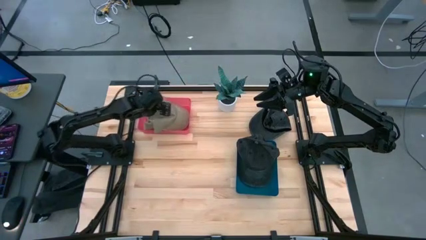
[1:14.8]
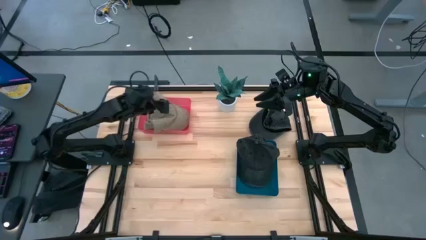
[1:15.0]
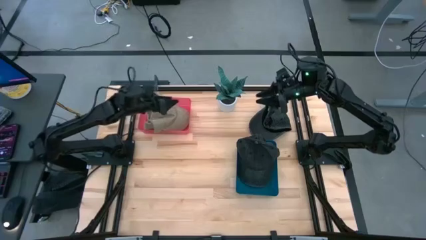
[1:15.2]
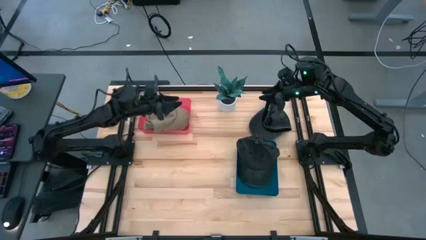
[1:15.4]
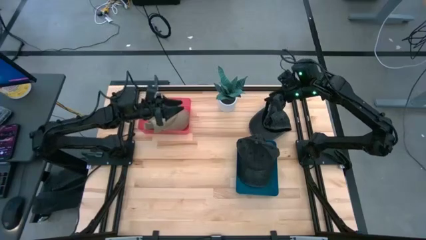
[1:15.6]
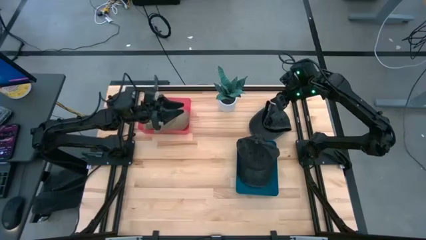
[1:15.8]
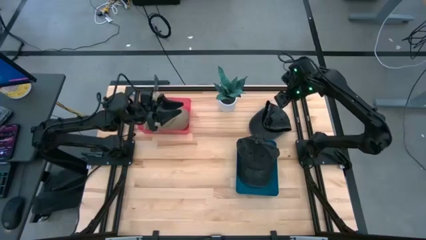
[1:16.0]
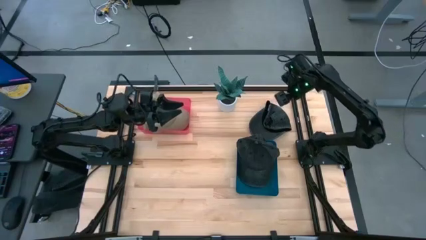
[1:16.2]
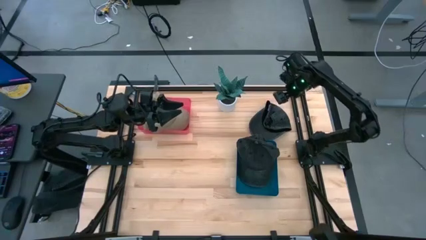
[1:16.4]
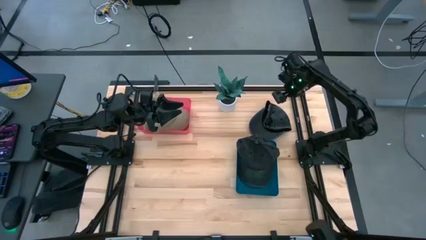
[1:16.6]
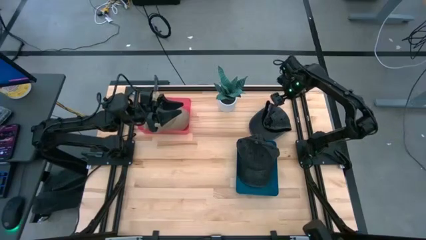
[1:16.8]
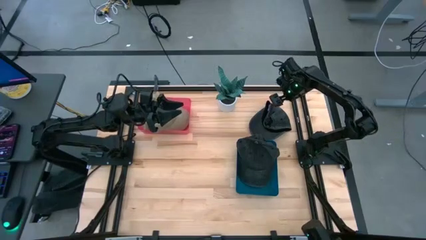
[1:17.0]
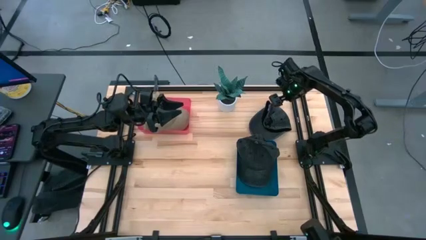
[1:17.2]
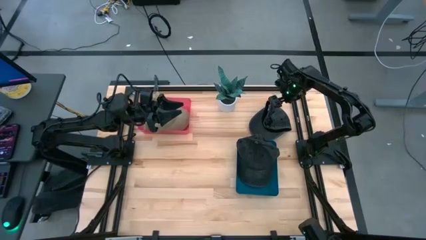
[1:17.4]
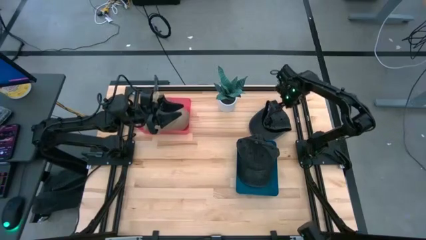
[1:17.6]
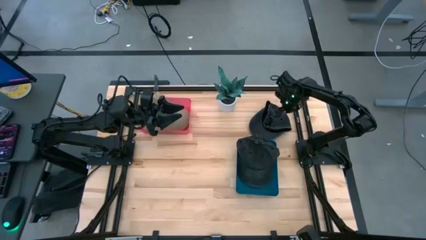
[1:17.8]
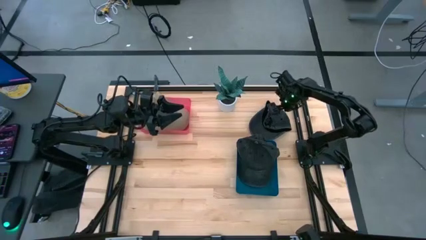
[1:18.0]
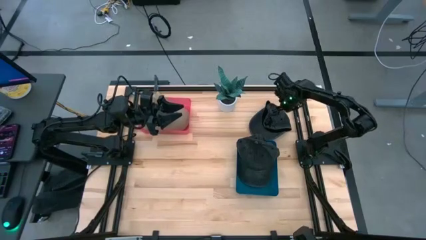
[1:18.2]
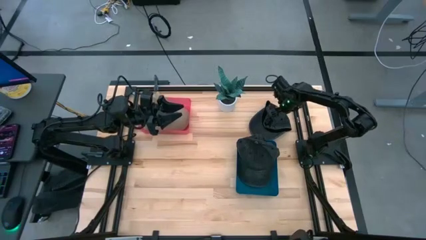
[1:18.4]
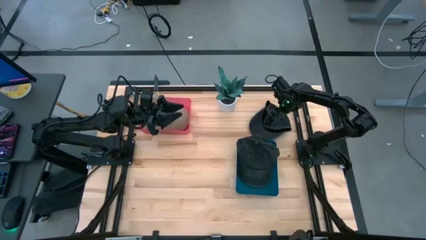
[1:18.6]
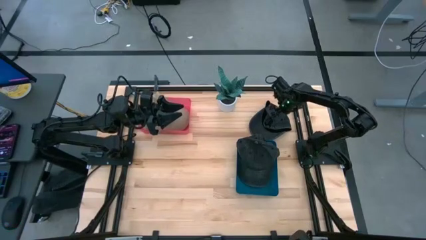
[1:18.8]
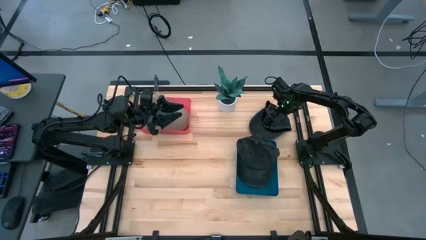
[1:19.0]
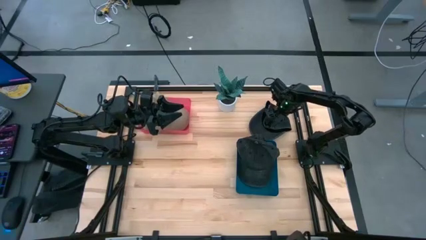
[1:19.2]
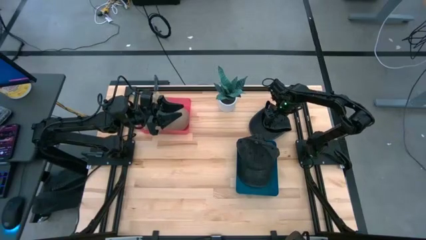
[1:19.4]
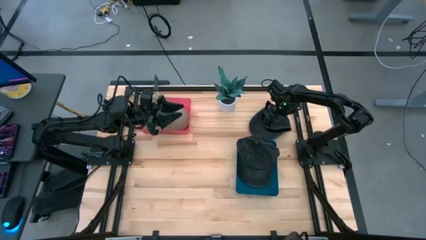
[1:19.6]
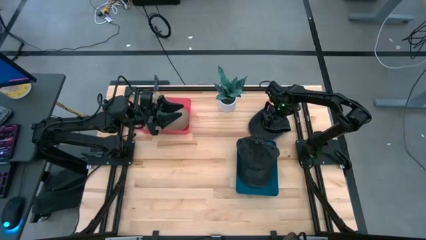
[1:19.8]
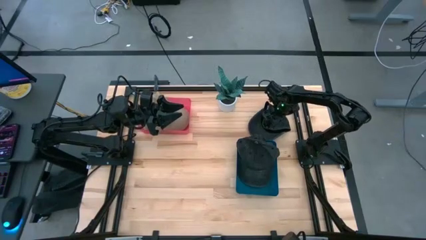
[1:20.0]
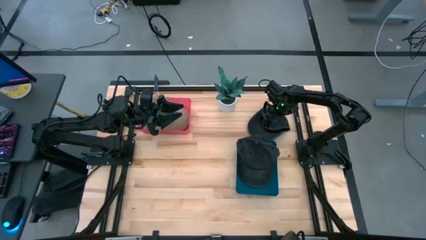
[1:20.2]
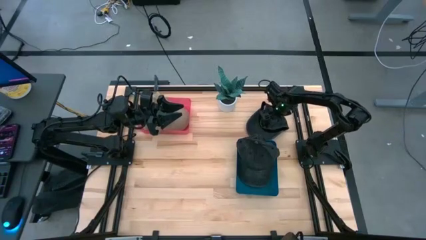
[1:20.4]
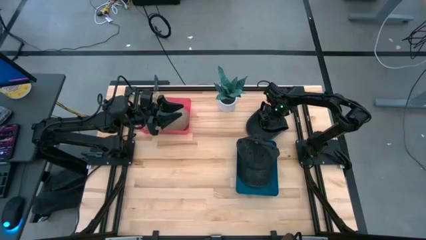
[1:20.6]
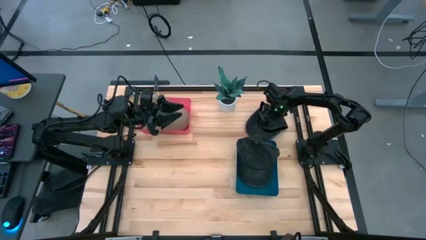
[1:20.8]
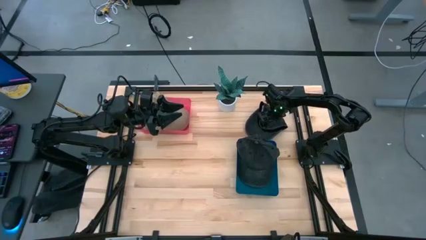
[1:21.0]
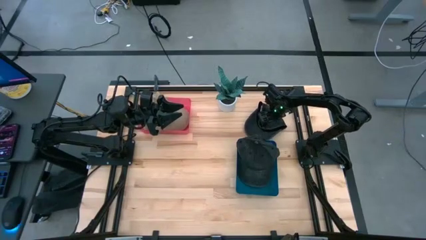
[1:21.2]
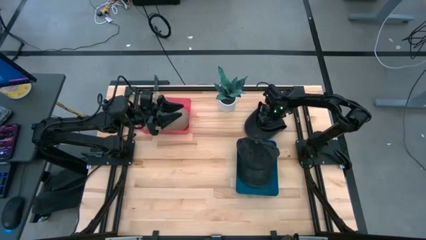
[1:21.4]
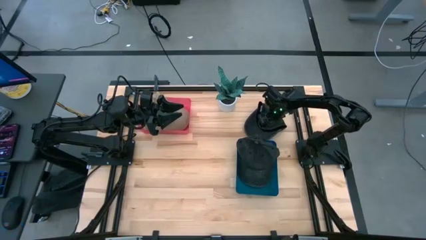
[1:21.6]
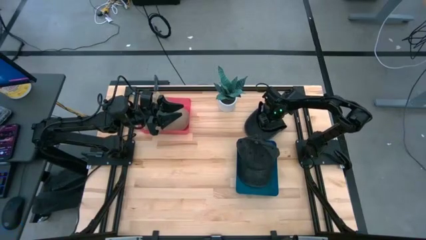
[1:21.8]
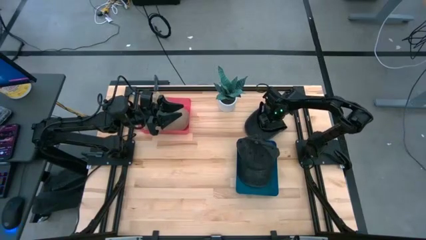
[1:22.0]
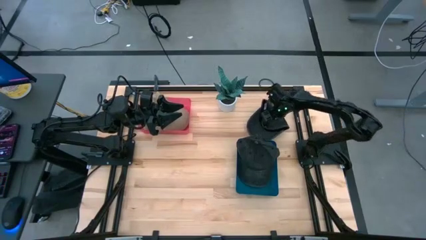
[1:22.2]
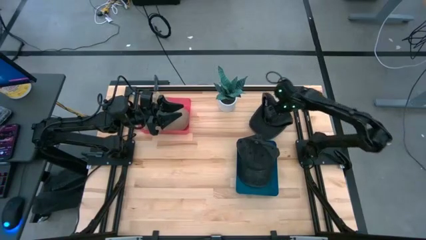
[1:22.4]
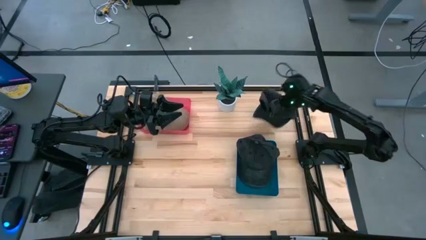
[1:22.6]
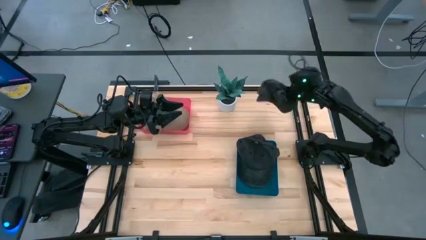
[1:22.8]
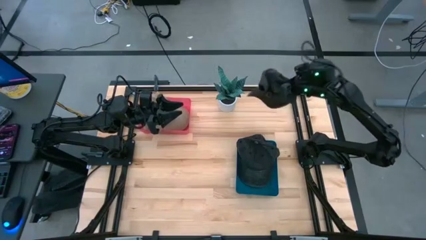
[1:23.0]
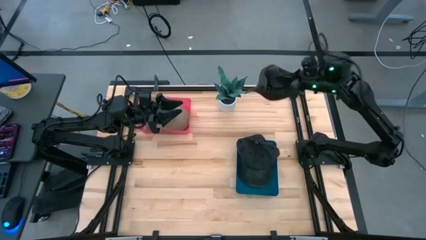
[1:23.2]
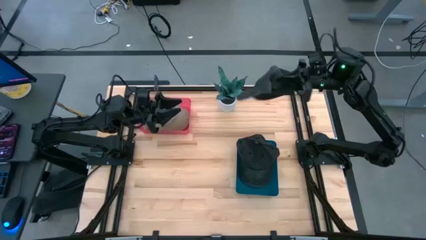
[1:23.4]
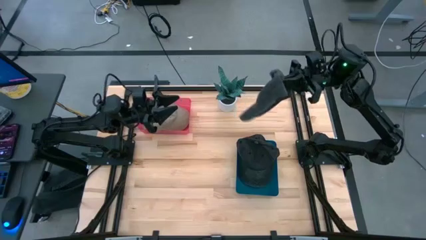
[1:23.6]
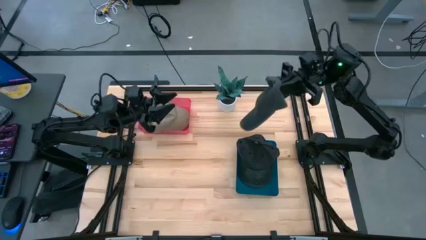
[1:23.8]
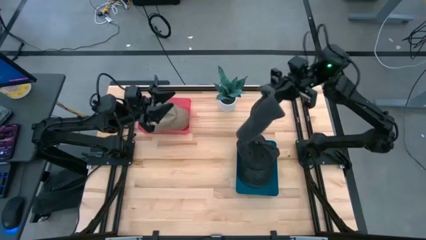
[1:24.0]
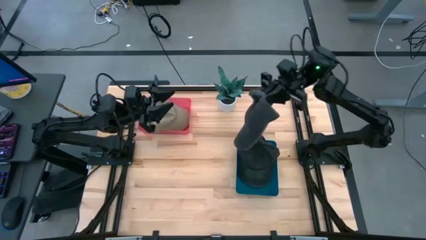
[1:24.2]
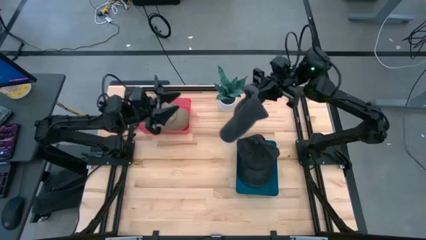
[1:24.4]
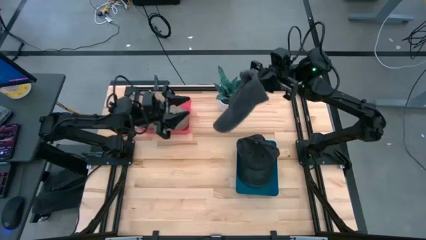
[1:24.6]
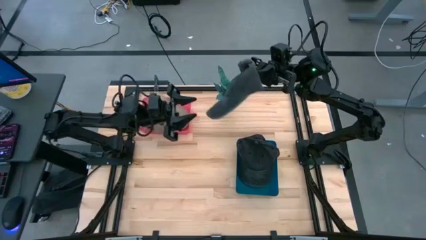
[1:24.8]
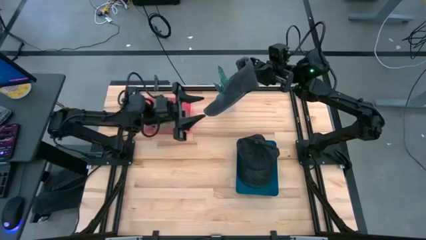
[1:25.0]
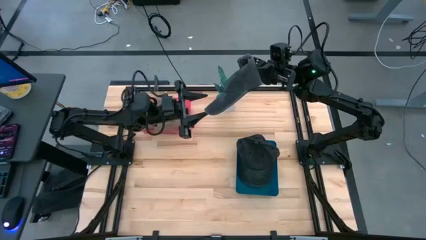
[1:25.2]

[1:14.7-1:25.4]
Task: Pick & Place hat
Put the black cap into the blue bin
